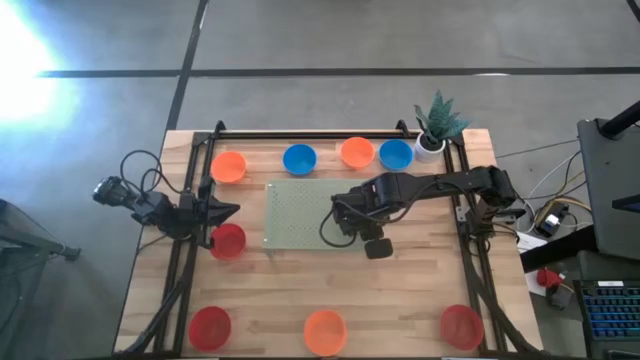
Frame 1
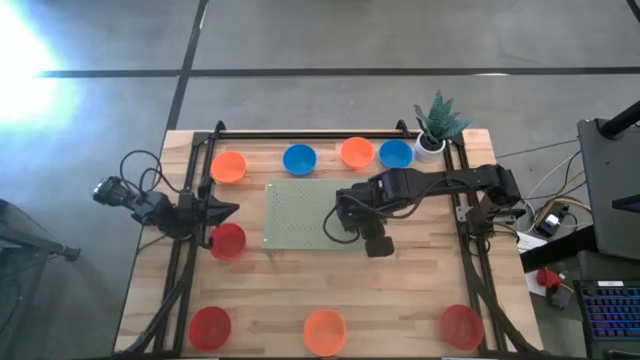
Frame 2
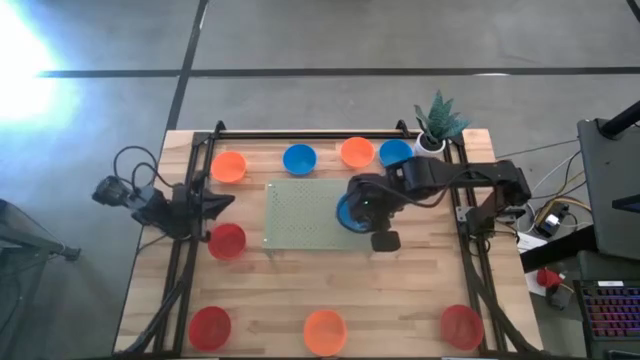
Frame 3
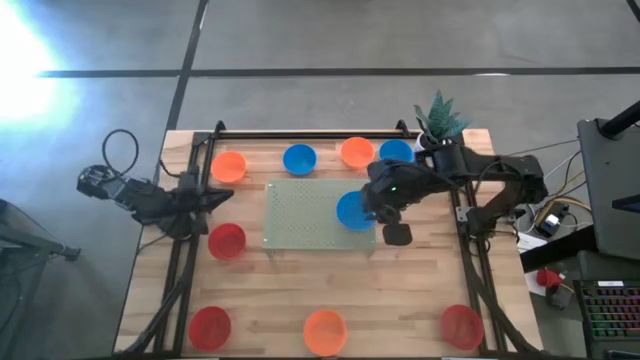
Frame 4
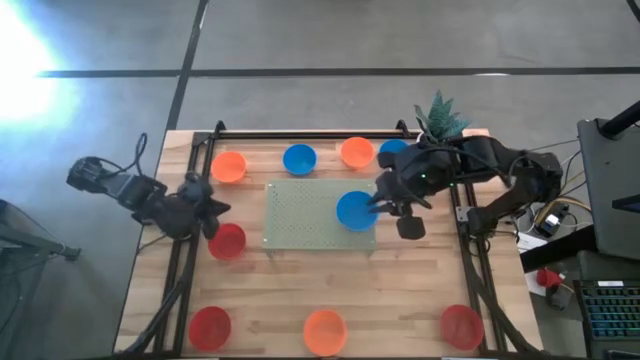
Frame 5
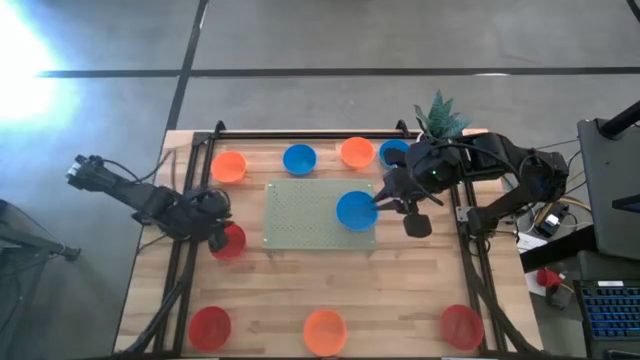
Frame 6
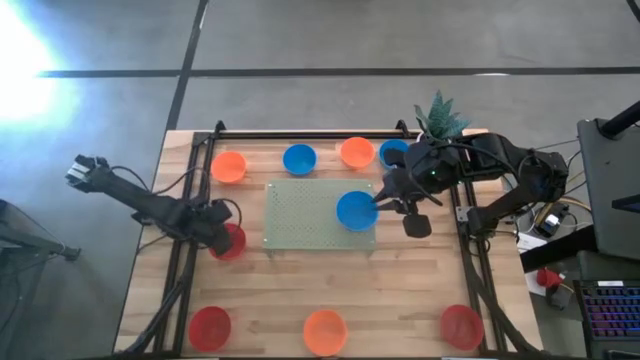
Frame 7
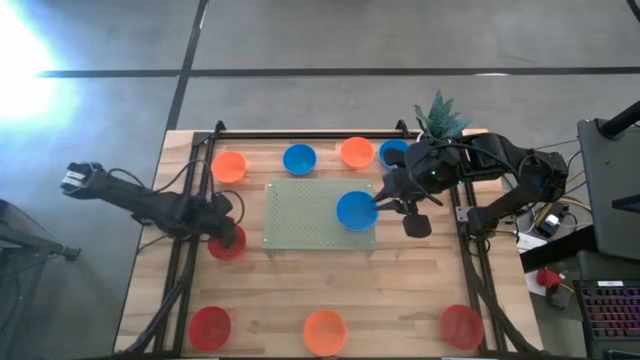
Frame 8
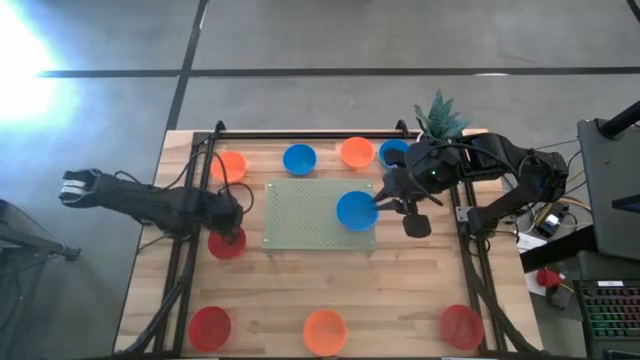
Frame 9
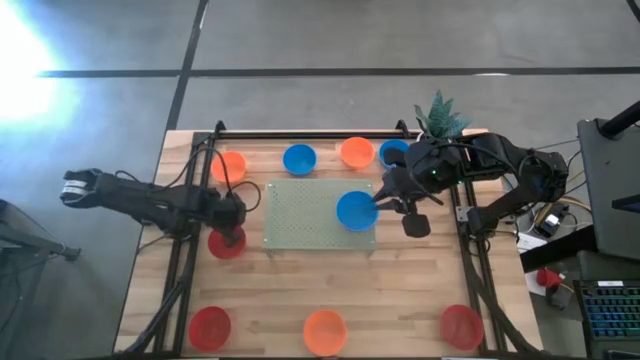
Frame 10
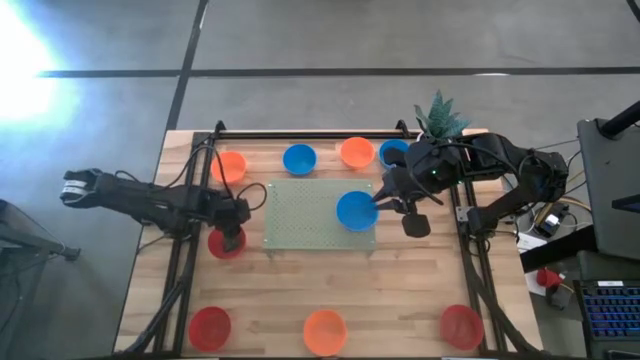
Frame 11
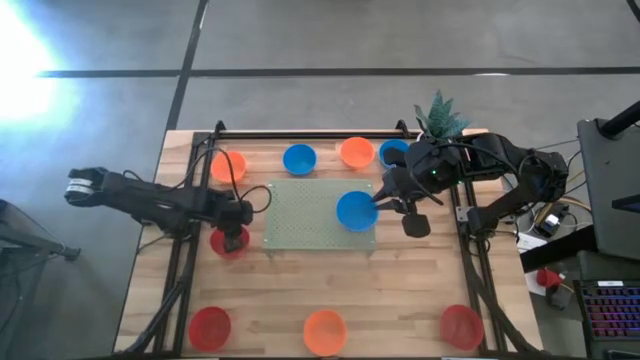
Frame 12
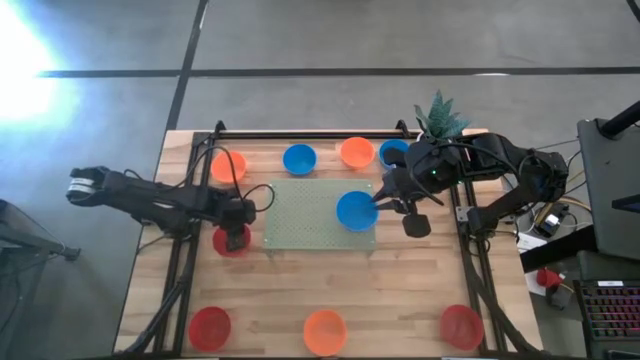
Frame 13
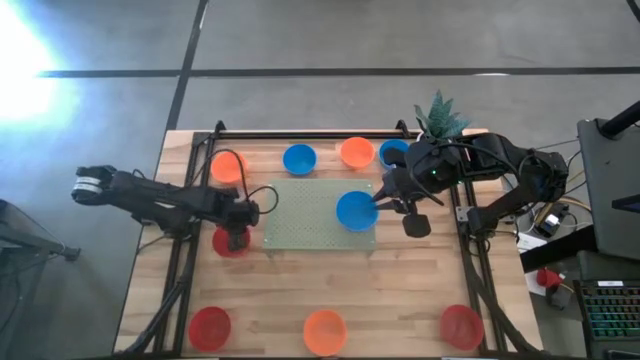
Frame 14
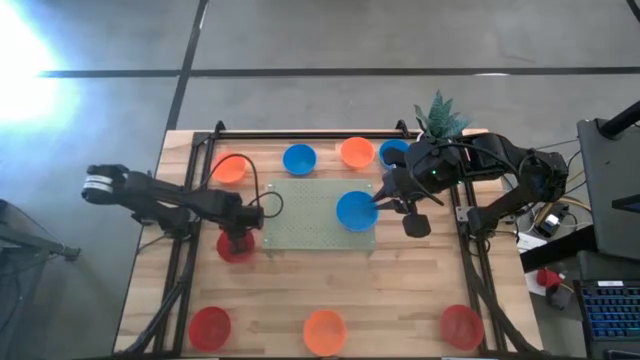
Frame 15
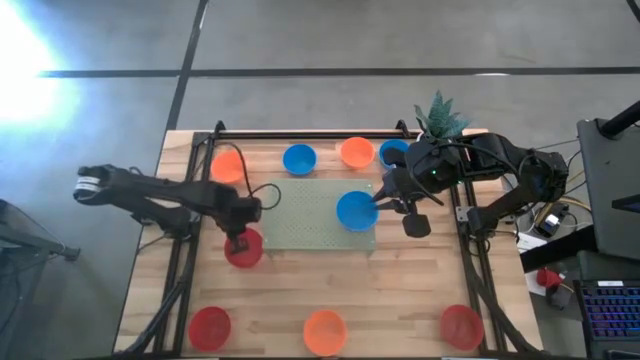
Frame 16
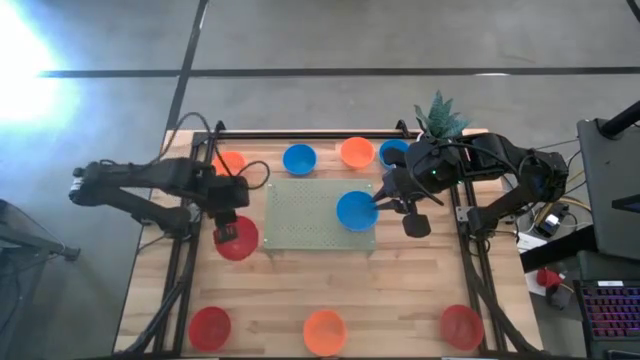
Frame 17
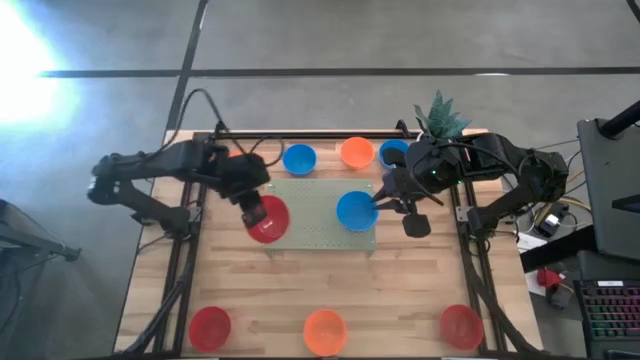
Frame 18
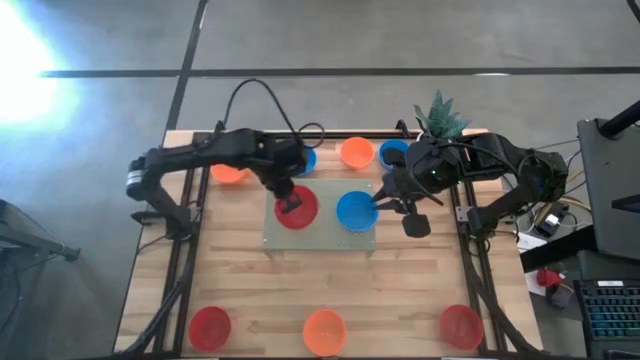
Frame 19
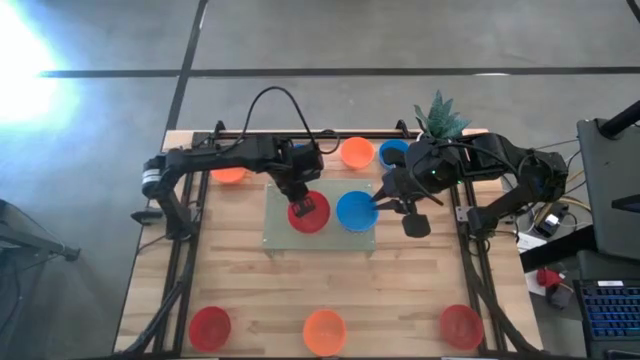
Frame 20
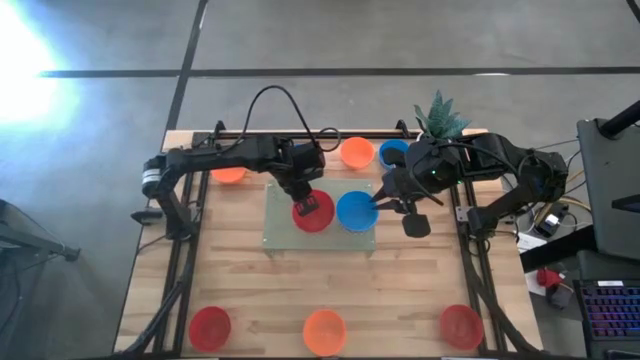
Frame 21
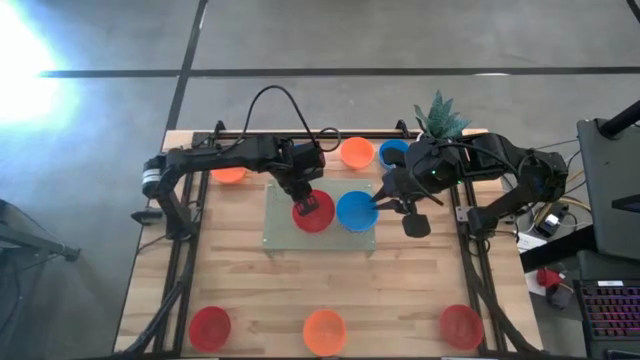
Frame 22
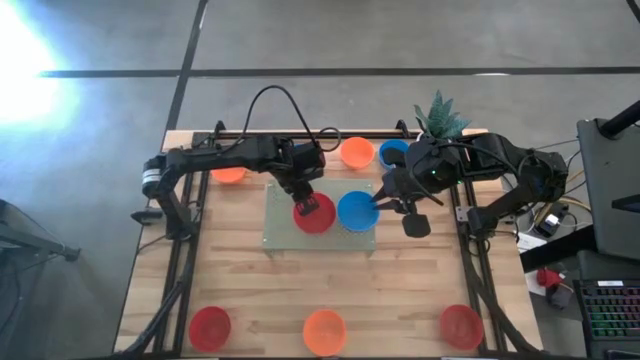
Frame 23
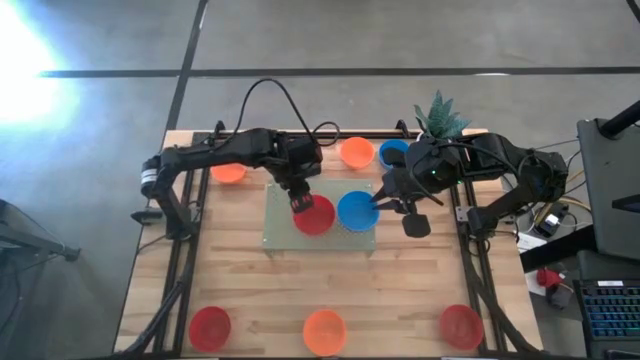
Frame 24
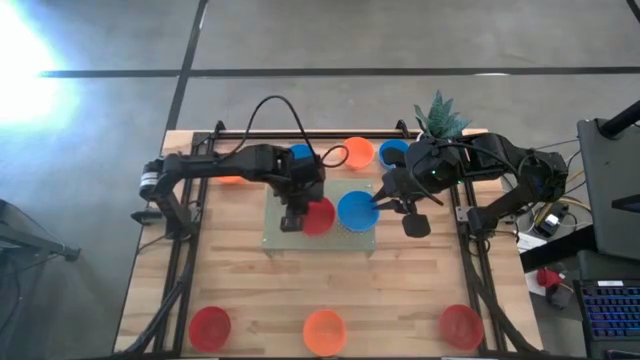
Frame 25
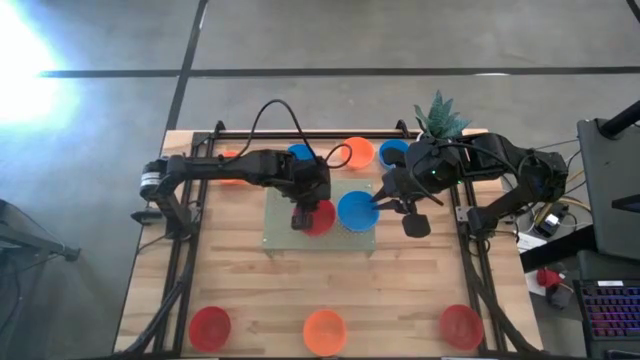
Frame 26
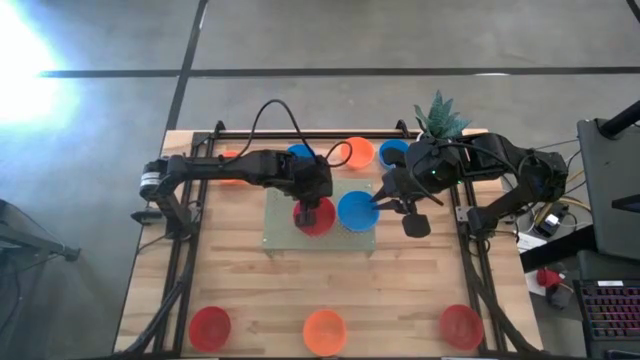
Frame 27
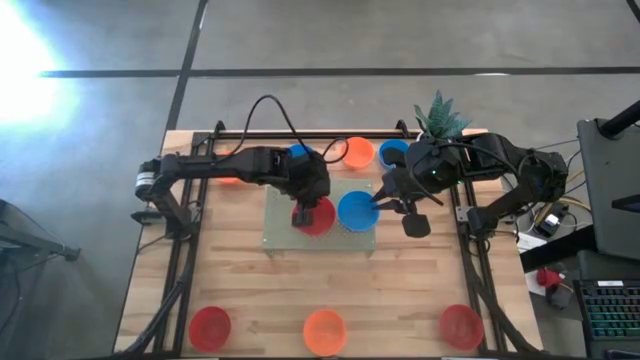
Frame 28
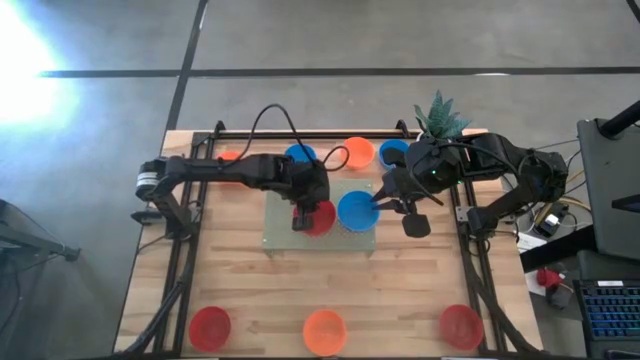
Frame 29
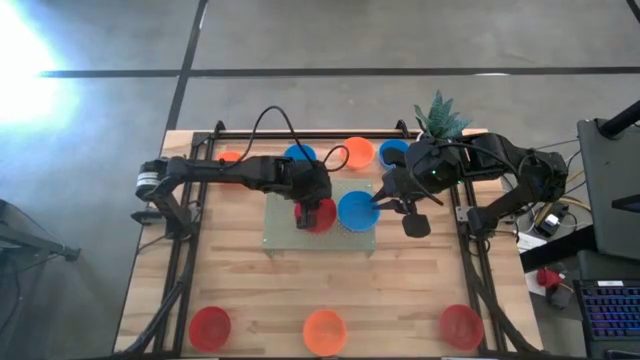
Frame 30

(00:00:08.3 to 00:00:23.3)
Task: Pick & Place Mini bowls
Put the top red bowl on the shelf

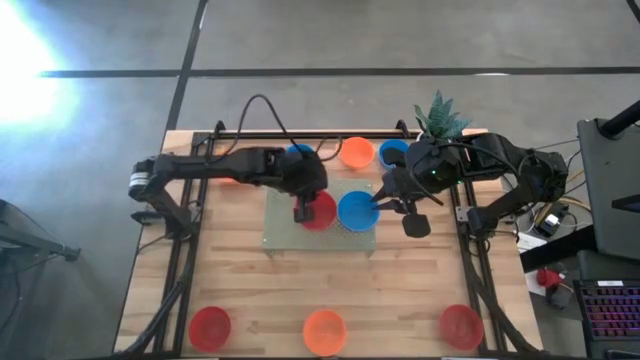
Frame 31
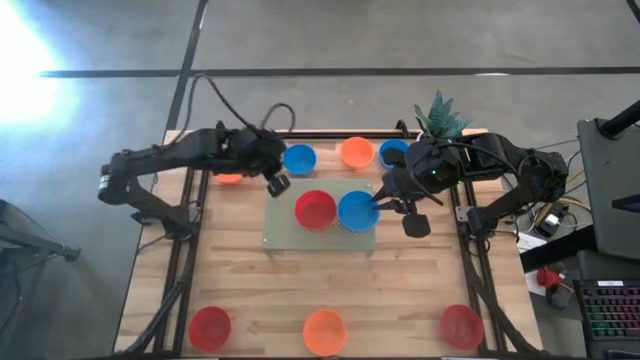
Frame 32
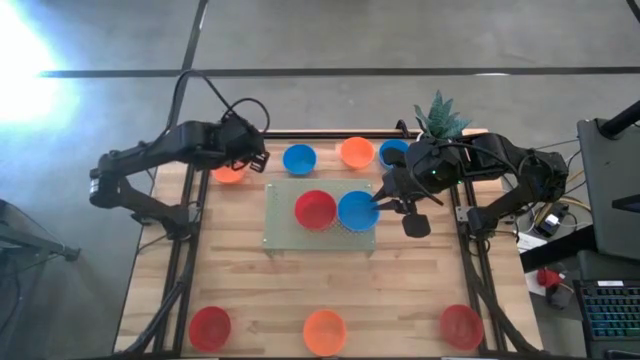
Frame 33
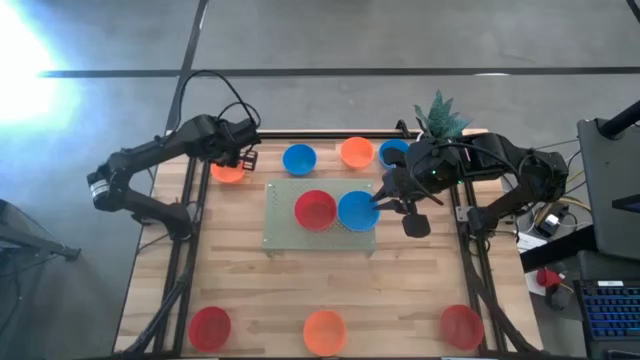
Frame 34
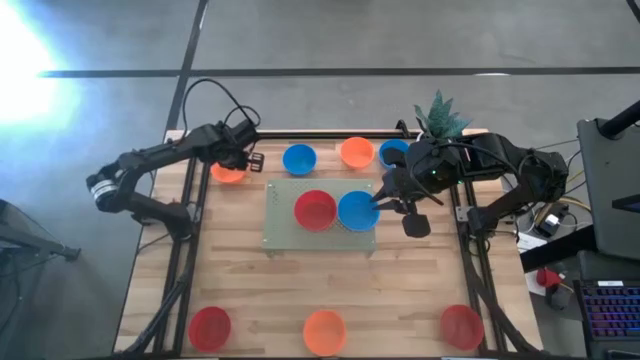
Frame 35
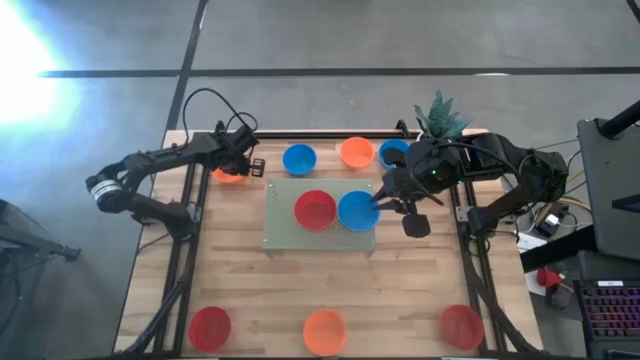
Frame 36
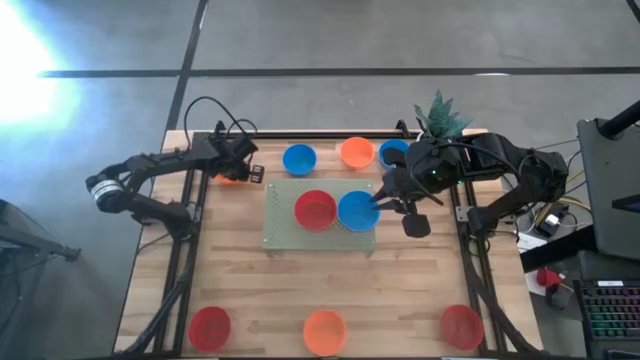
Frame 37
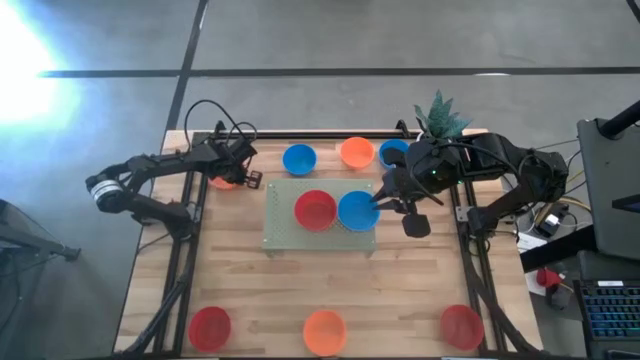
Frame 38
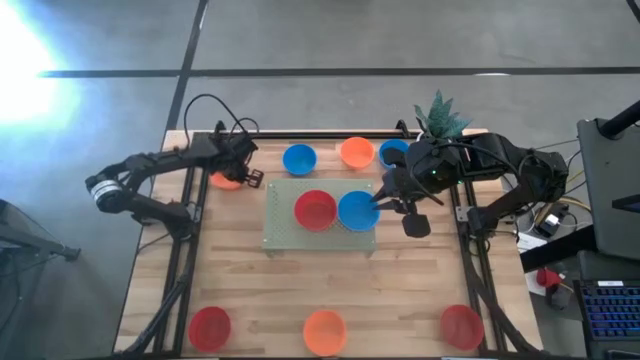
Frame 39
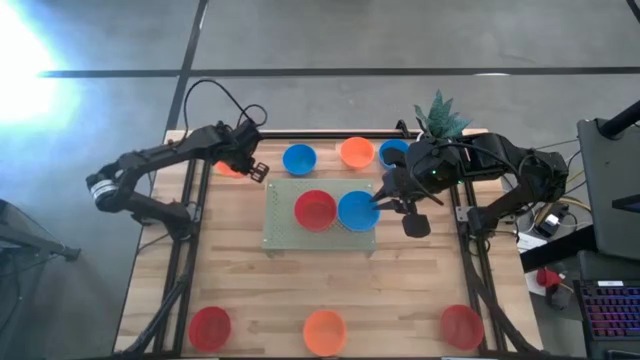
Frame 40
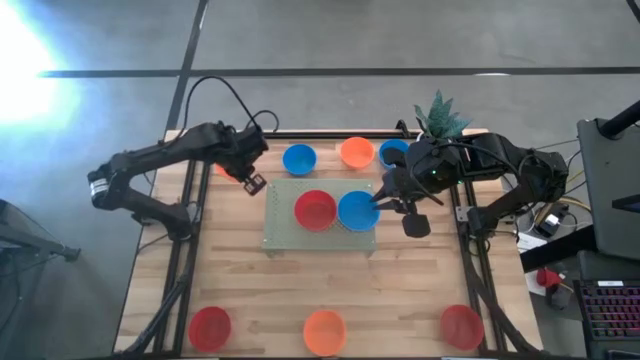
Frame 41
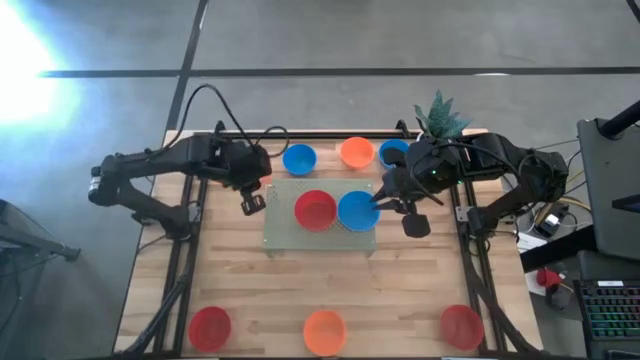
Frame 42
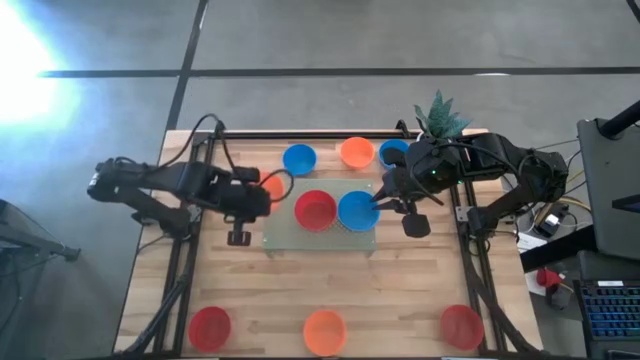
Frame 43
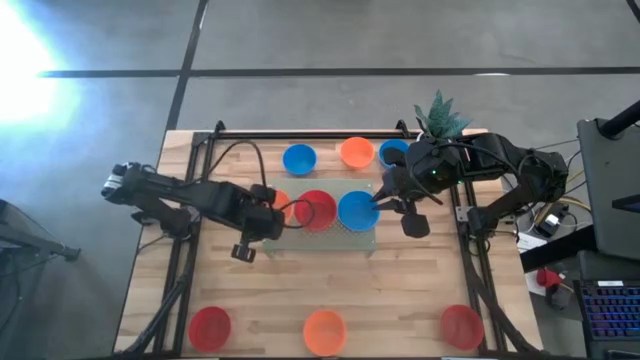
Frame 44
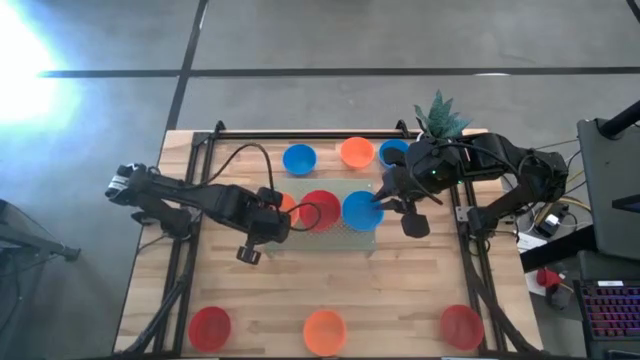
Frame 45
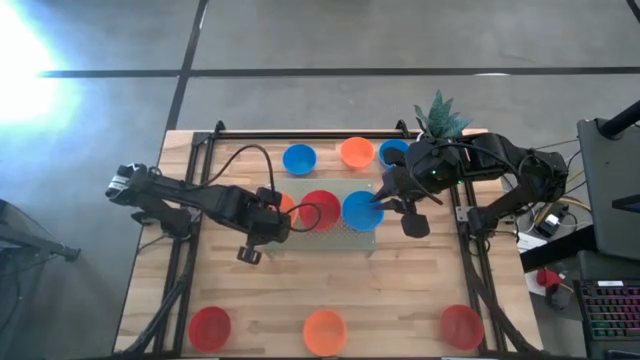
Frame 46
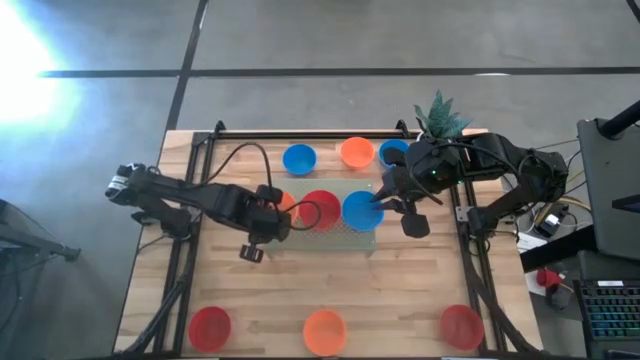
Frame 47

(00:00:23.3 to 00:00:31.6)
Put the top left orange bowl on the shelf
